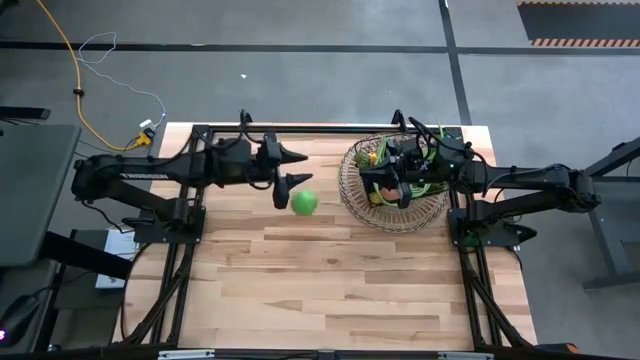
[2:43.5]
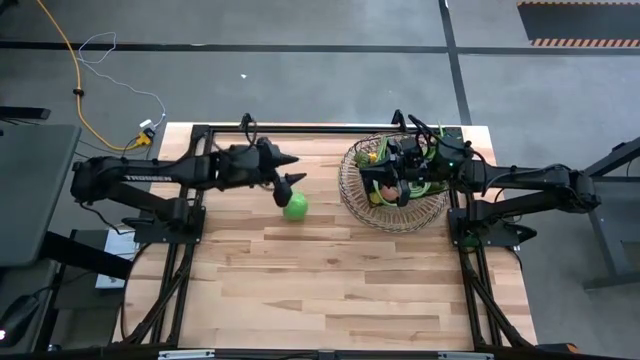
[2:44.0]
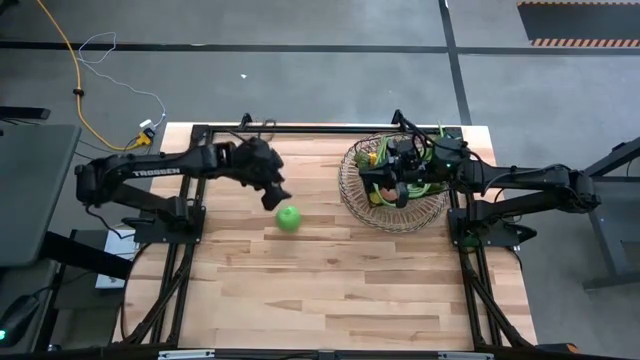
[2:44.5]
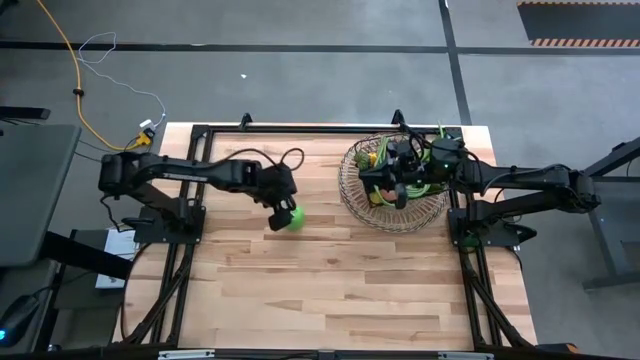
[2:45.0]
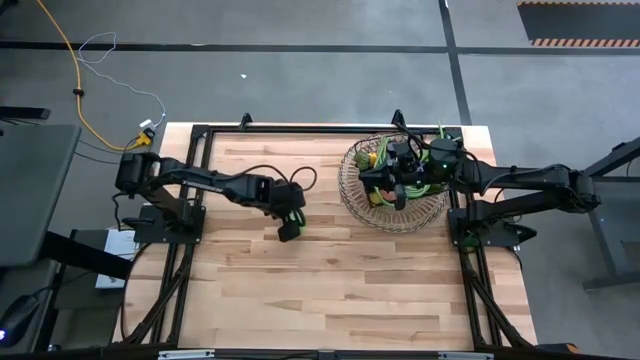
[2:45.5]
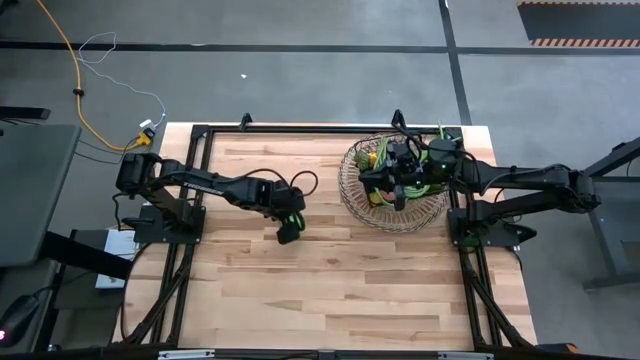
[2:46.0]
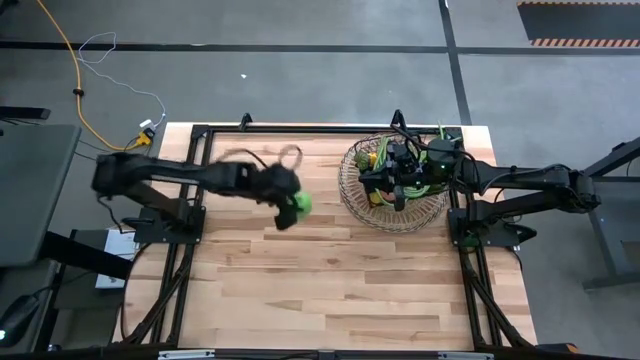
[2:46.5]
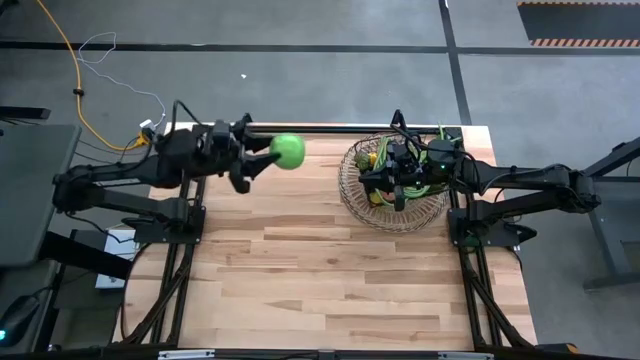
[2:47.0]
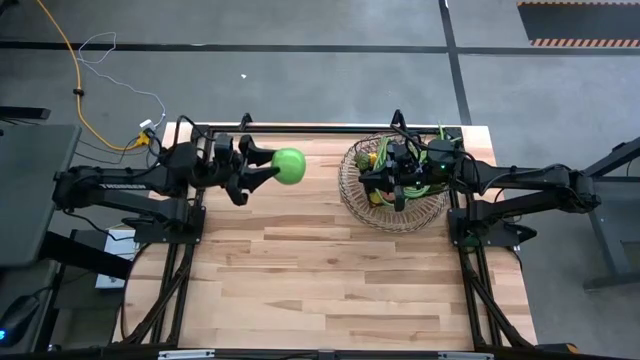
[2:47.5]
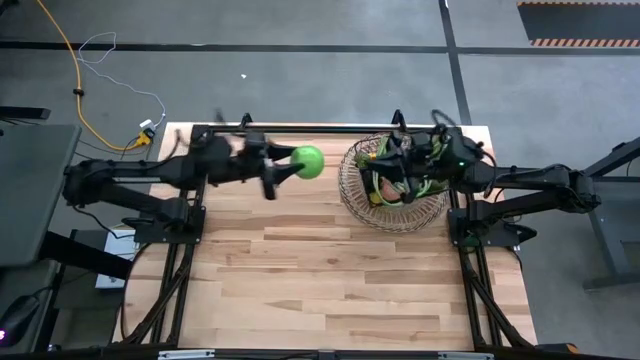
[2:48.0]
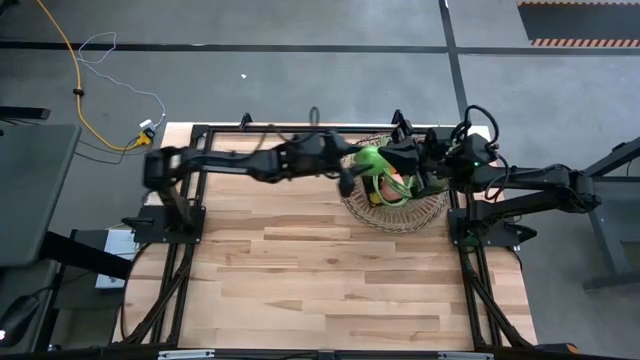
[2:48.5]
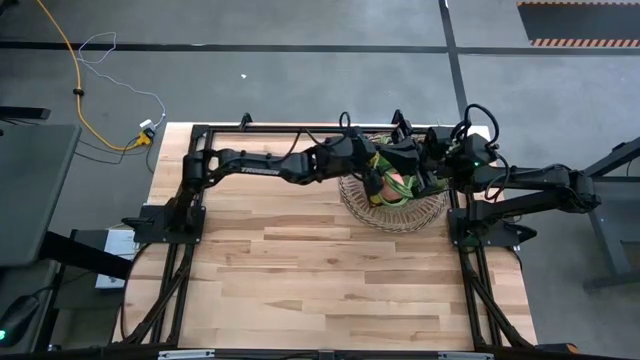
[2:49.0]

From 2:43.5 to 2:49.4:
Task: Build produce basket
Put the green apple into the wire basket

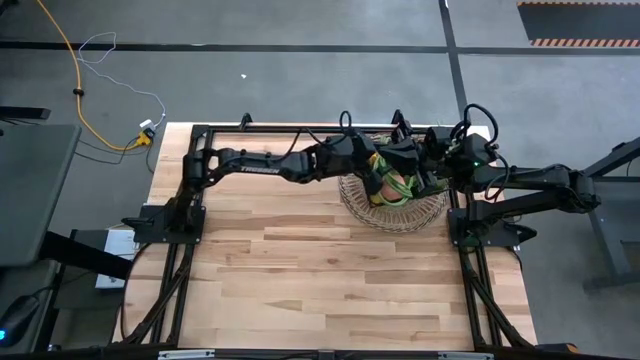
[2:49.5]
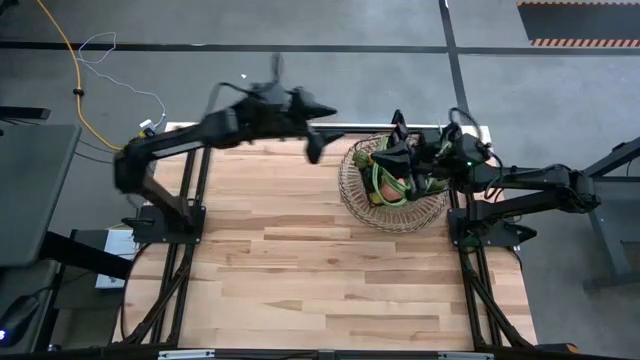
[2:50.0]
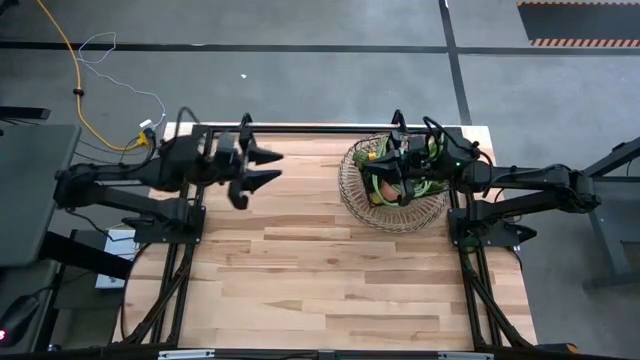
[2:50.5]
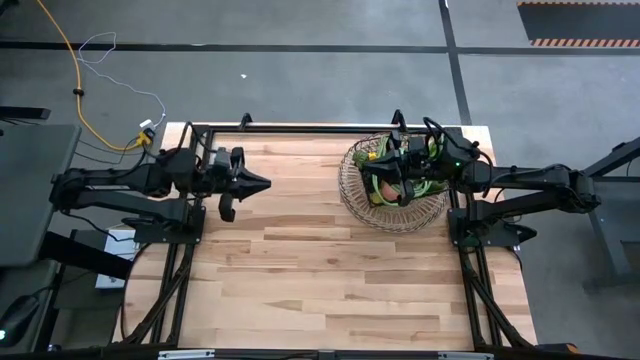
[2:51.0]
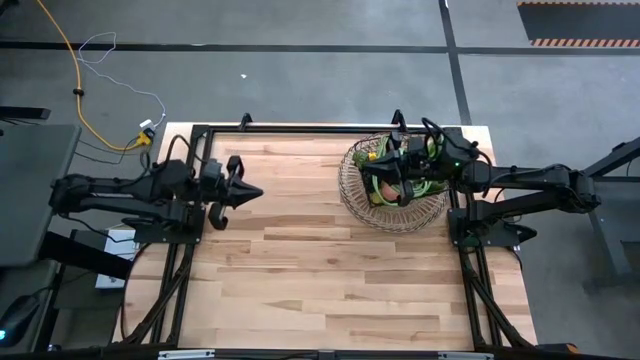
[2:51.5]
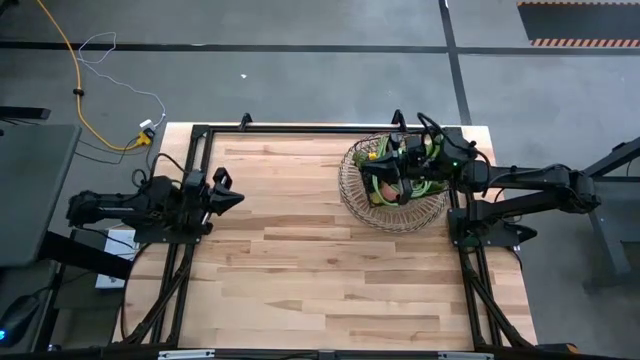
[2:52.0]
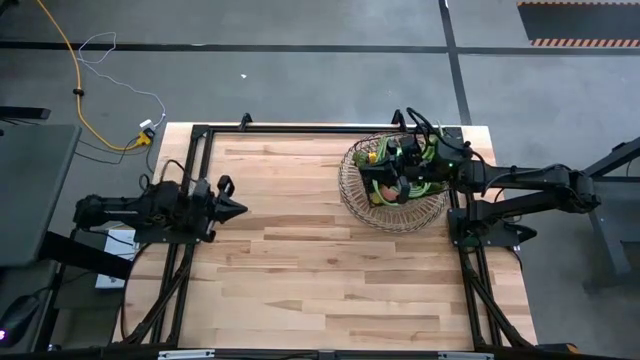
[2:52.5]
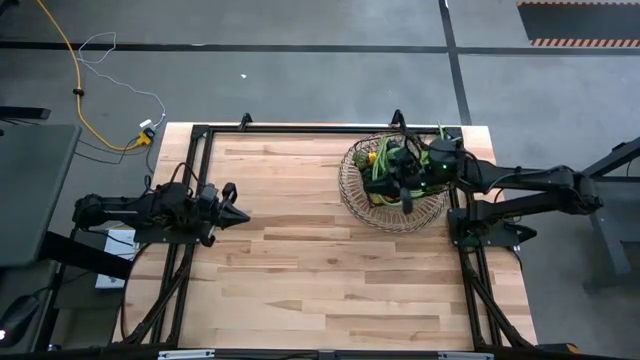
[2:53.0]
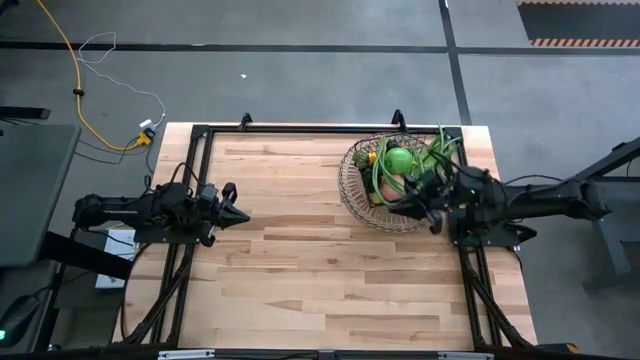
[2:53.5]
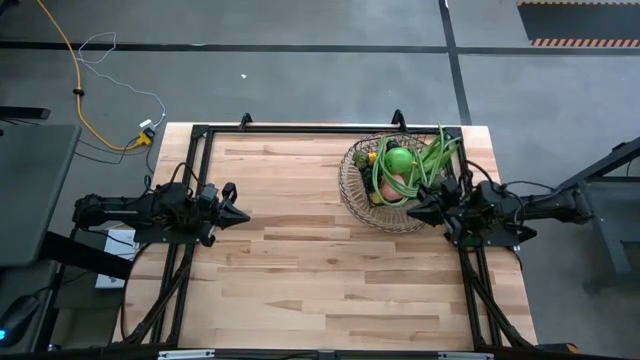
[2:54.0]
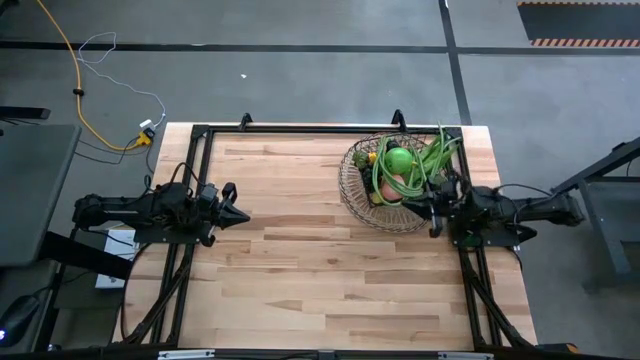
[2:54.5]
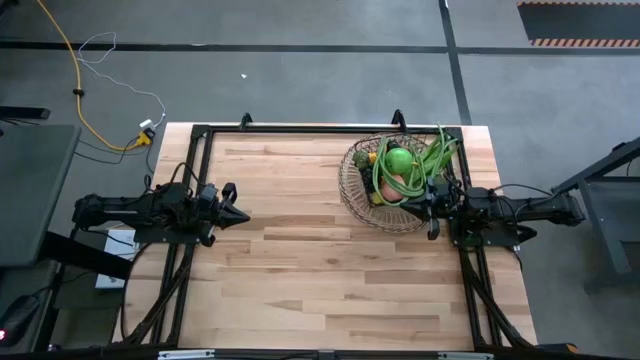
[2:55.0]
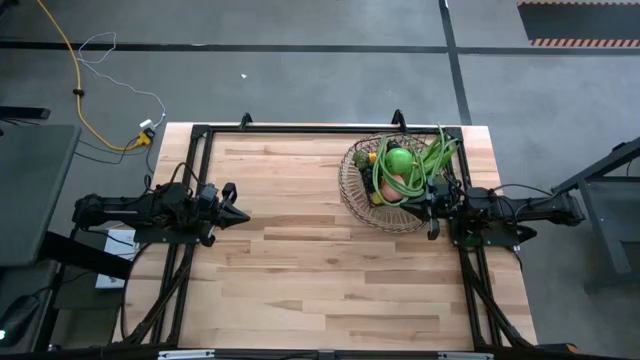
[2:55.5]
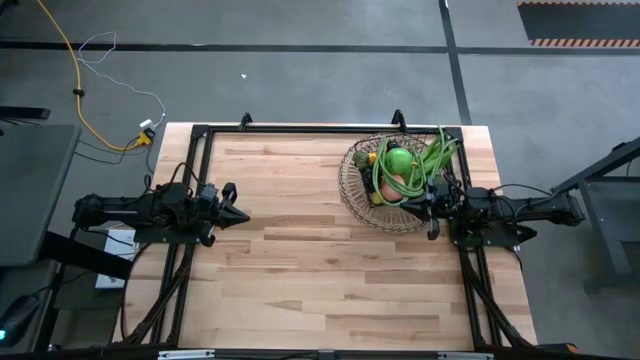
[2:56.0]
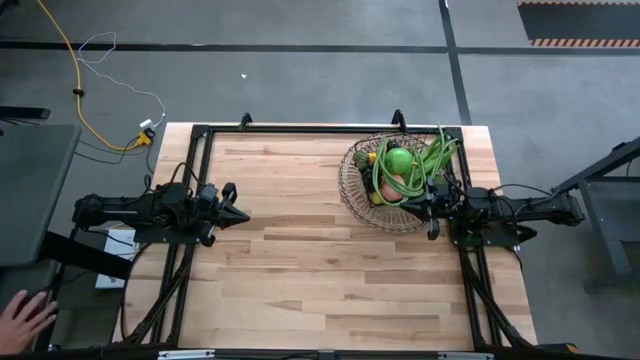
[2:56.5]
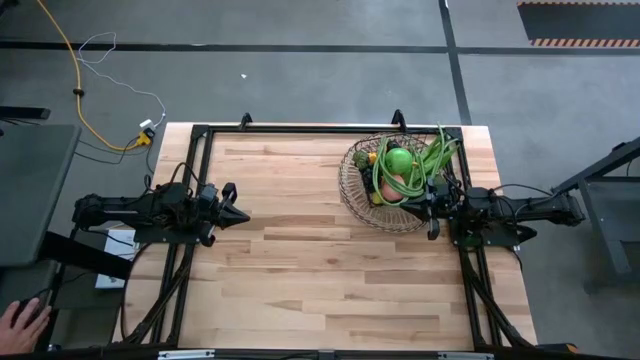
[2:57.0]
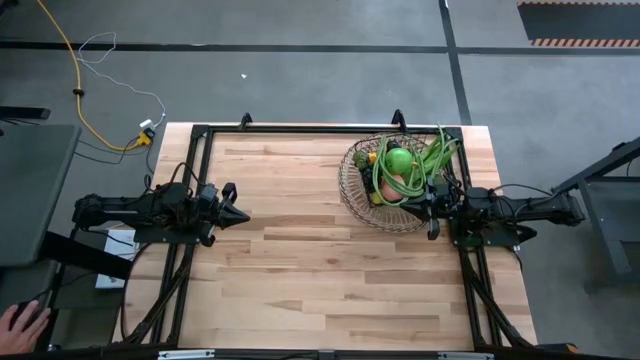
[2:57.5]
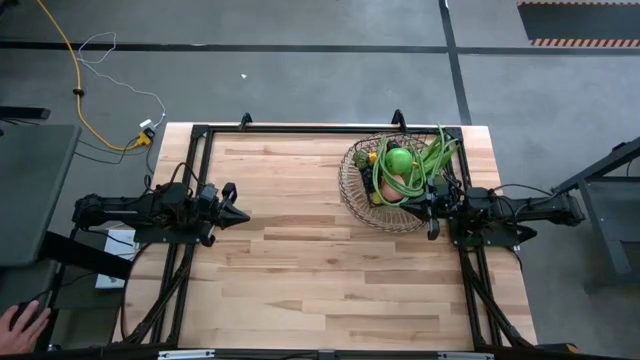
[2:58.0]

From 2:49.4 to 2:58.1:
Return to Home Position

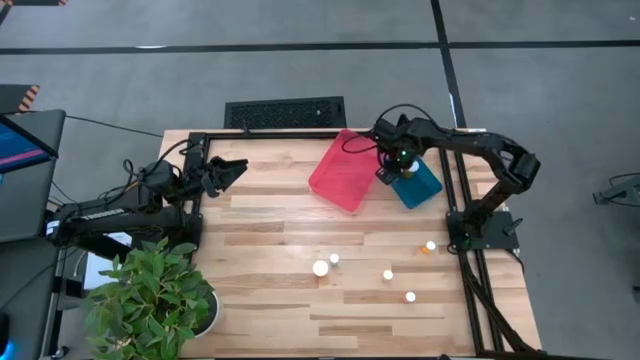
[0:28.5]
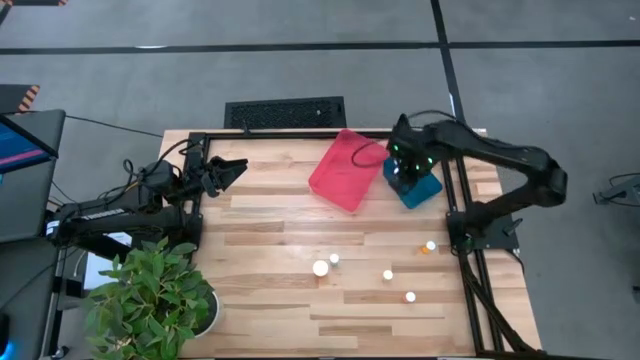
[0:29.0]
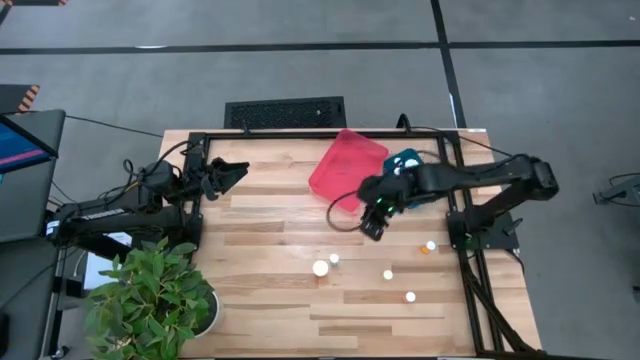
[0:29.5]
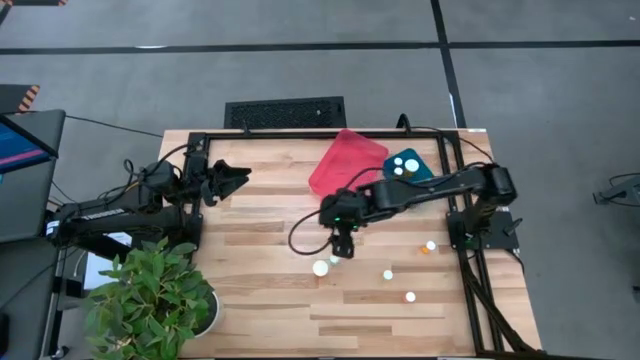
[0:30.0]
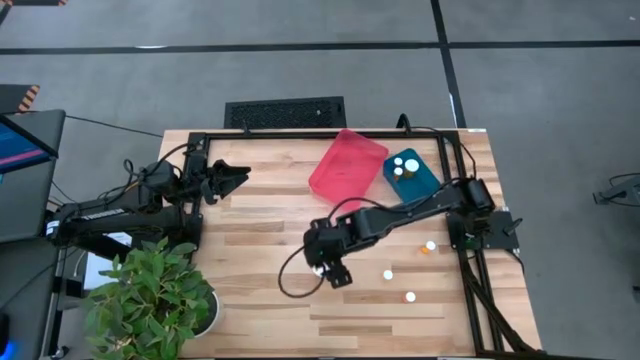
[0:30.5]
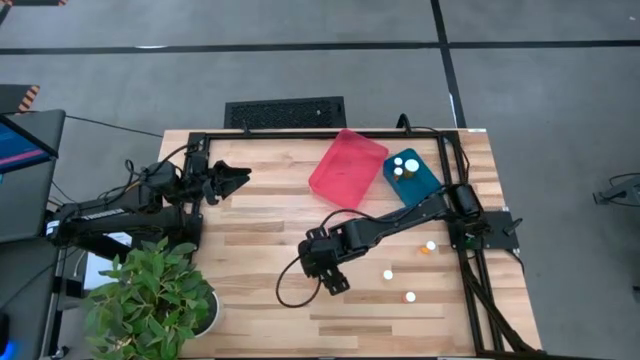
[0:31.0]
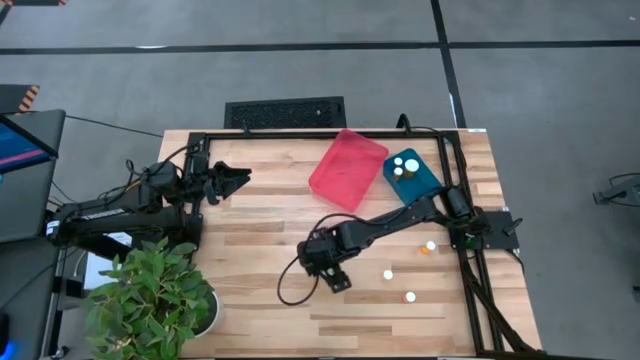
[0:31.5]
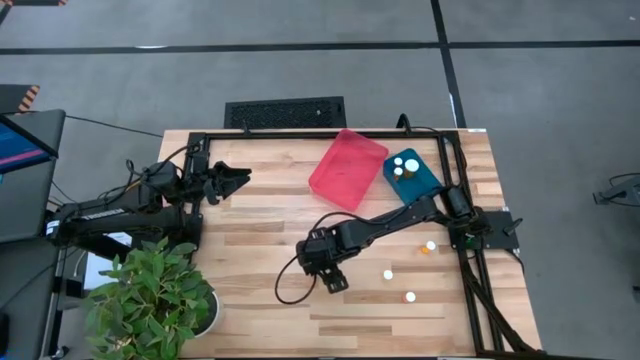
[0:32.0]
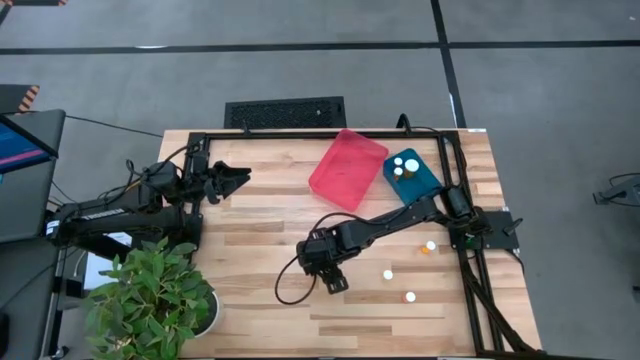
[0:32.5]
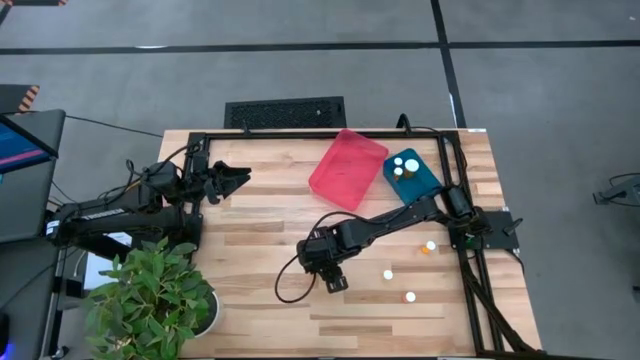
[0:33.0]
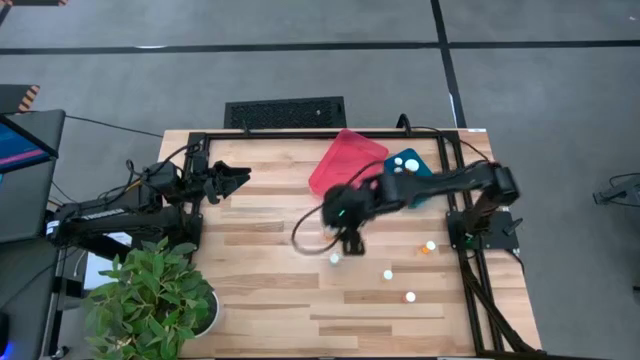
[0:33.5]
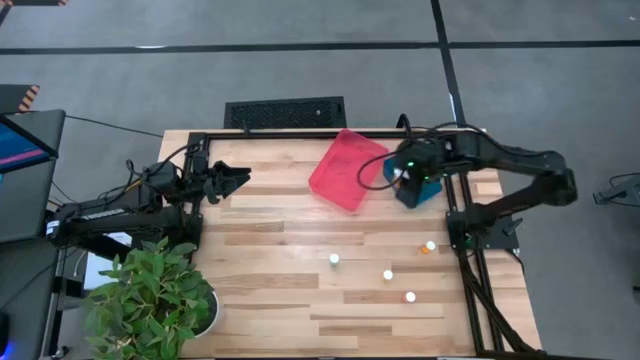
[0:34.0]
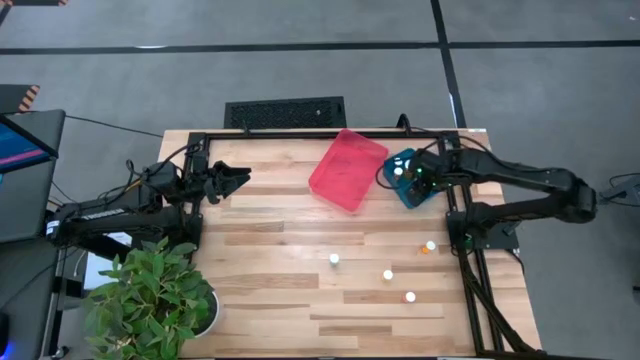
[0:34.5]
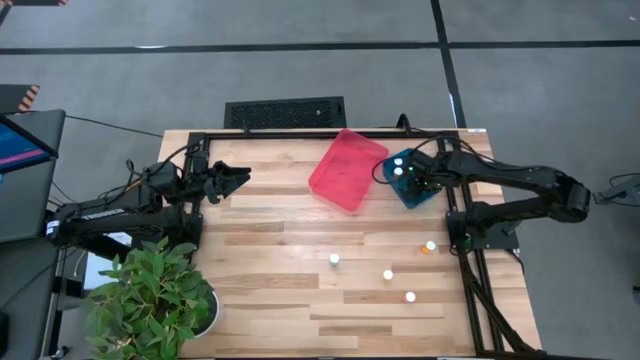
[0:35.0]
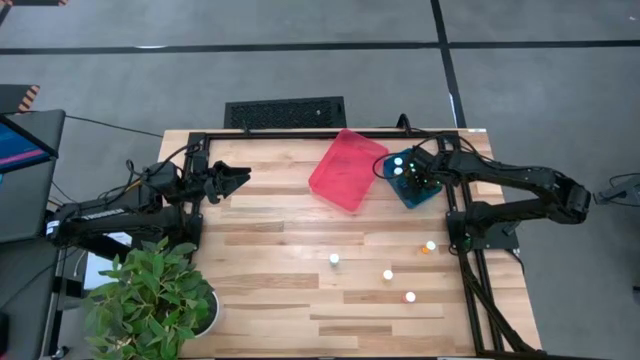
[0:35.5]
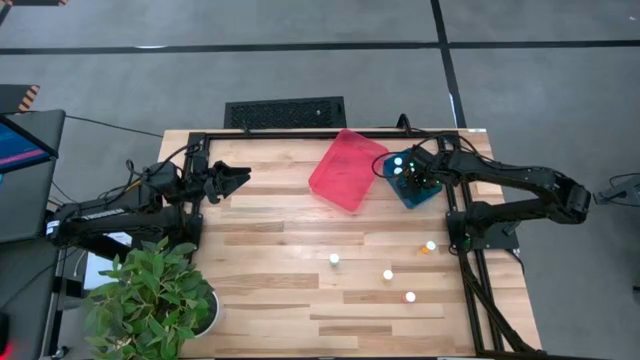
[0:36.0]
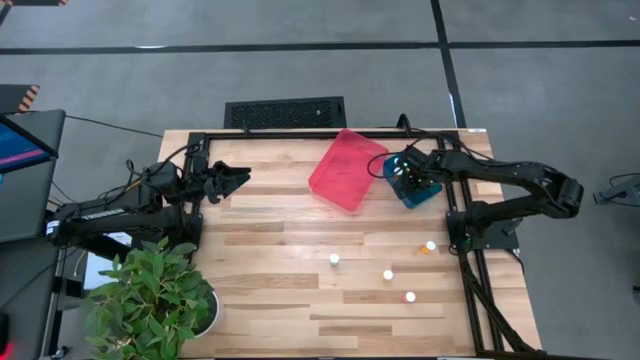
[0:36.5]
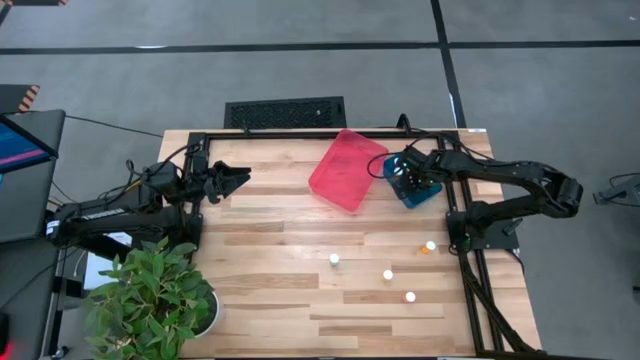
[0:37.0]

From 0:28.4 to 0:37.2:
Task: Pick and place medicine bottles into bin by pill shape (circle, oval)
Put the large orange capsule bottle into the blue bin
